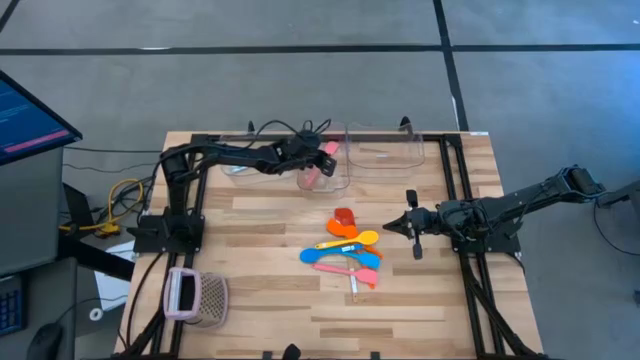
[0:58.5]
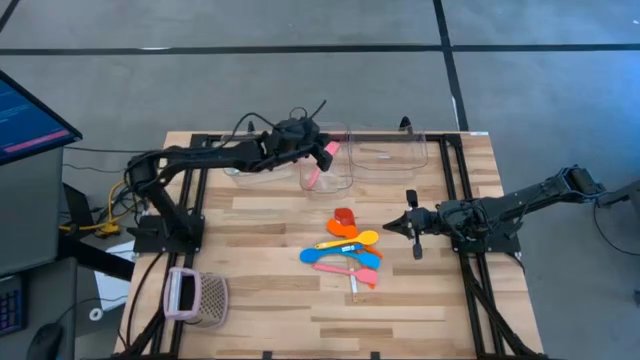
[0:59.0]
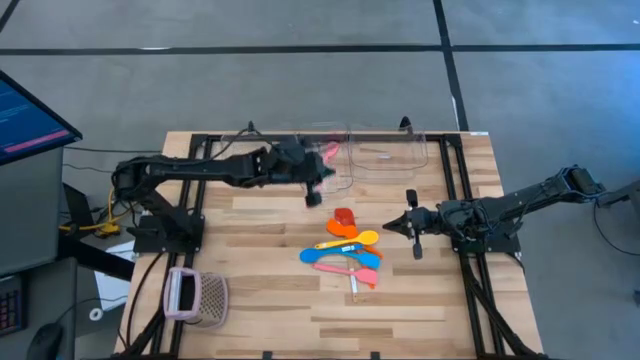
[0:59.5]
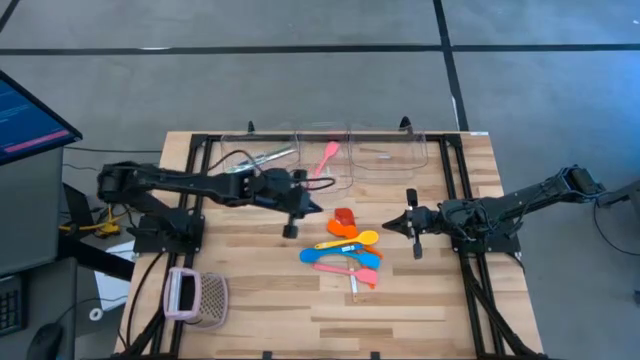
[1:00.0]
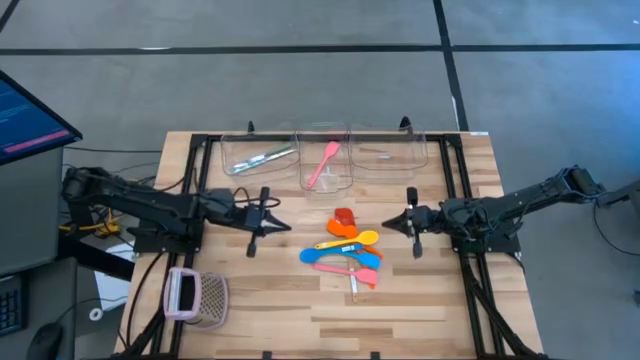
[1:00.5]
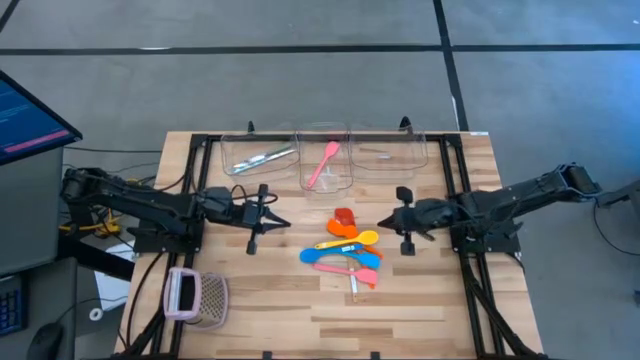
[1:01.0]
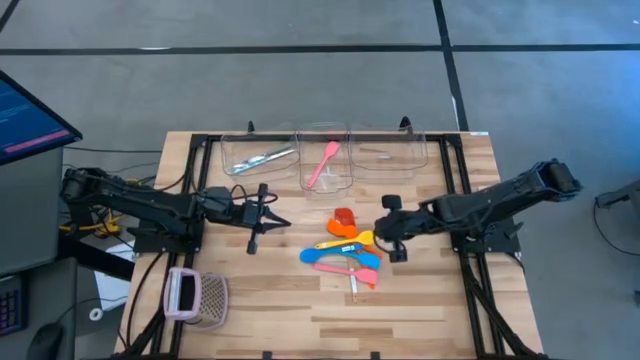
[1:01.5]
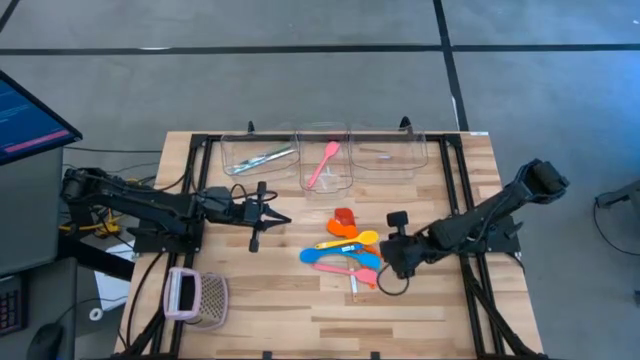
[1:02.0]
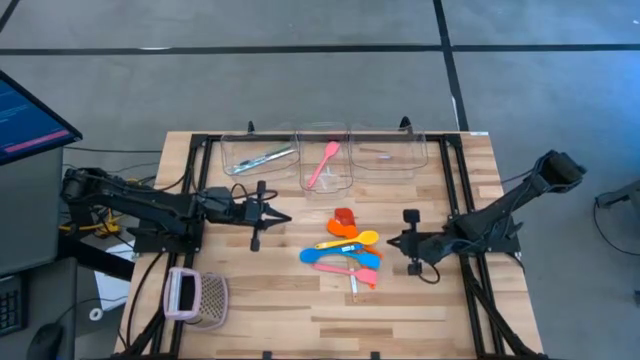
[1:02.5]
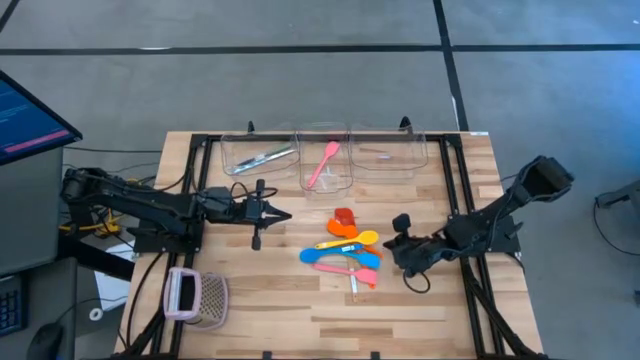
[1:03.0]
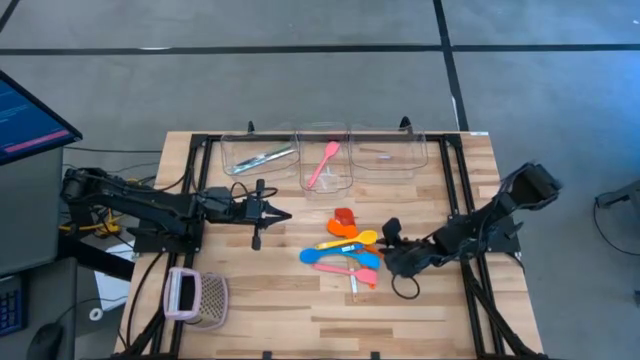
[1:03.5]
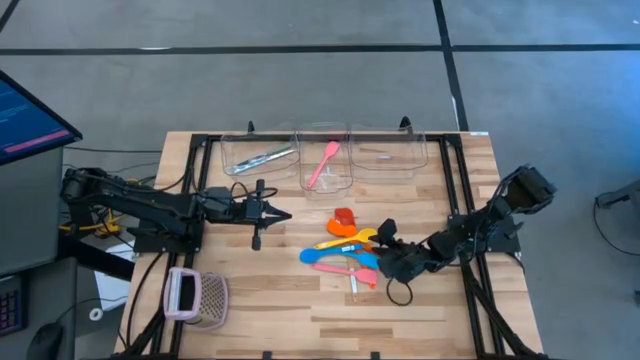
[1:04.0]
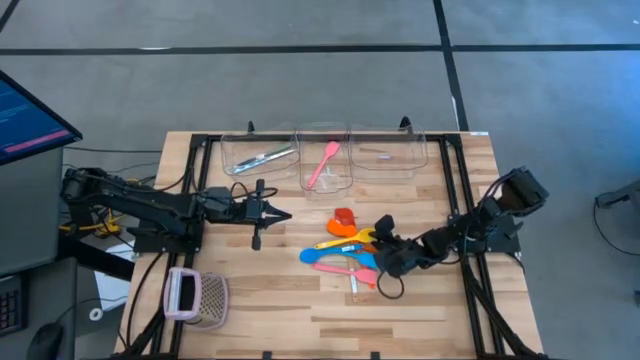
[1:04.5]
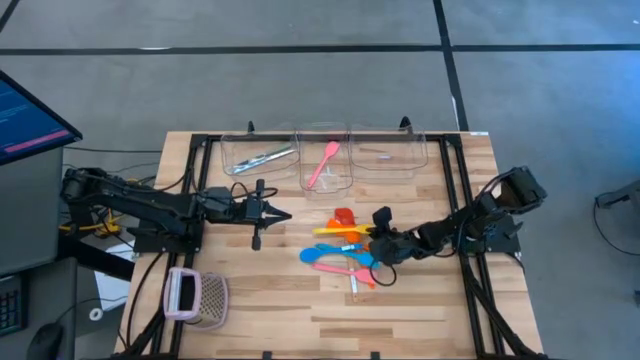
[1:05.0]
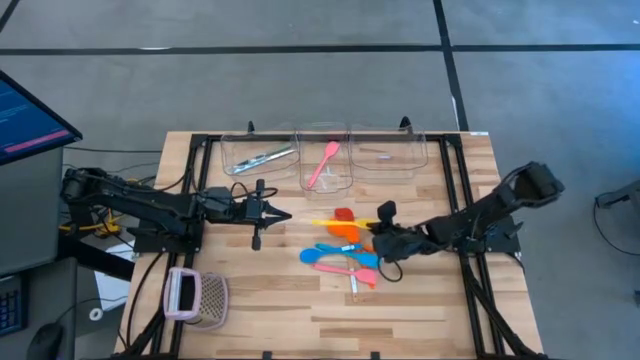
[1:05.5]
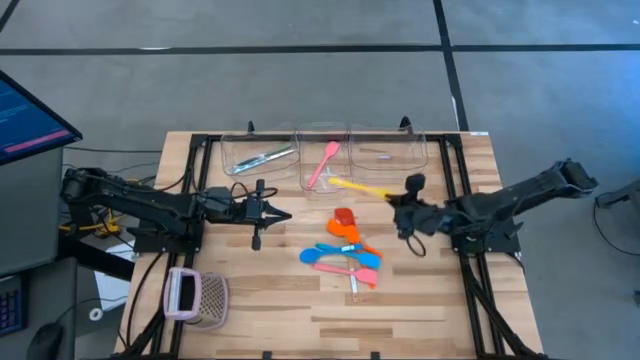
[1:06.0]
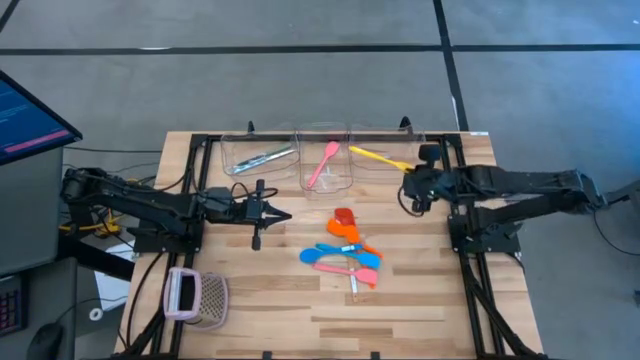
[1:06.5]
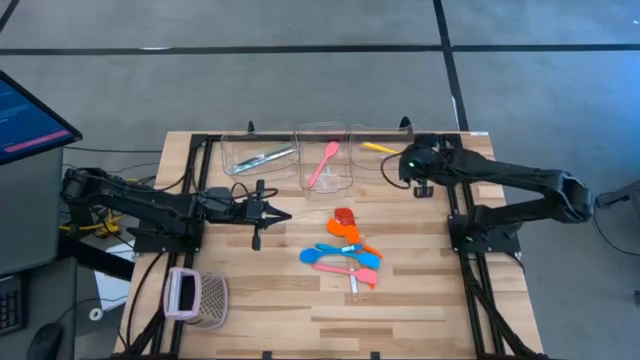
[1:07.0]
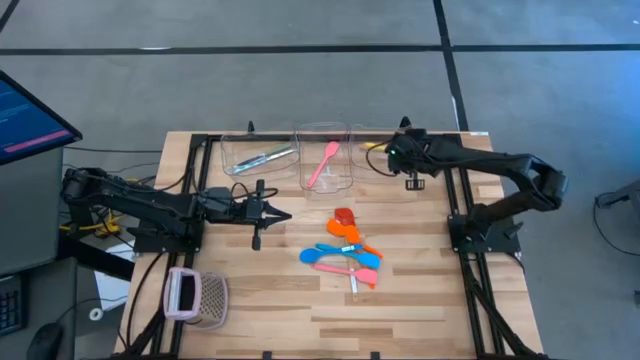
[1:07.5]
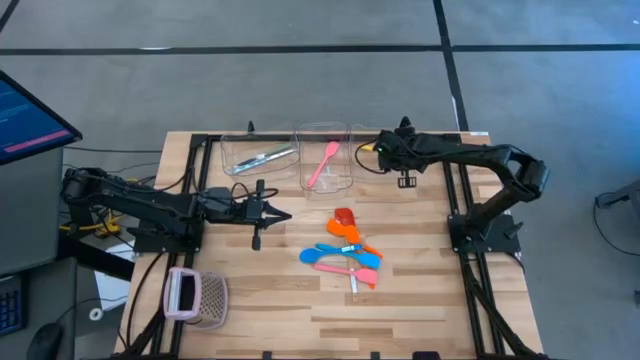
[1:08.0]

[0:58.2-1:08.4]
Task: Pick & Place Kitchen Items
Put the yellow serving spoon into the right transparent bin

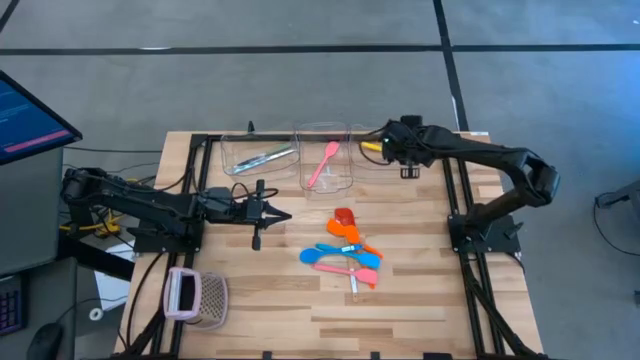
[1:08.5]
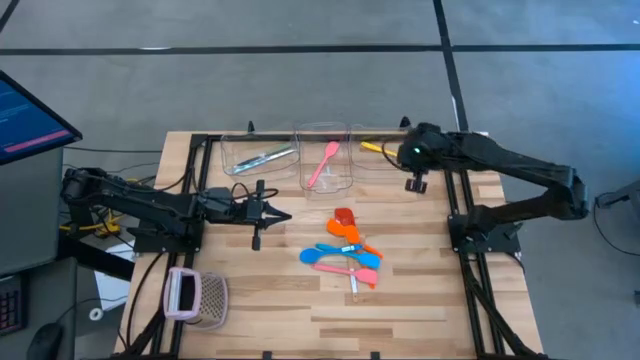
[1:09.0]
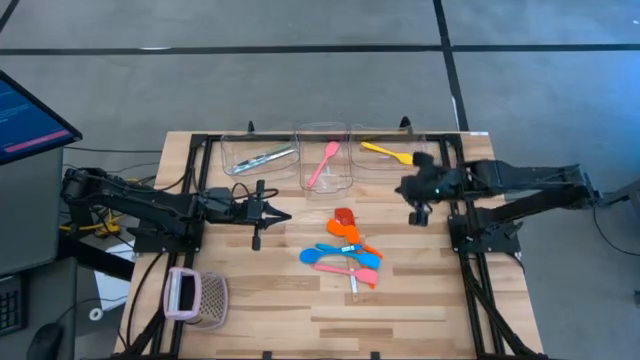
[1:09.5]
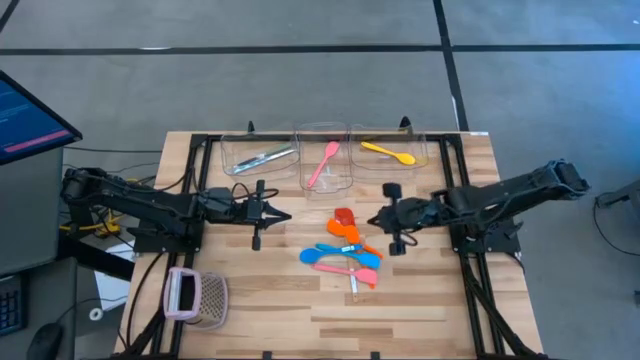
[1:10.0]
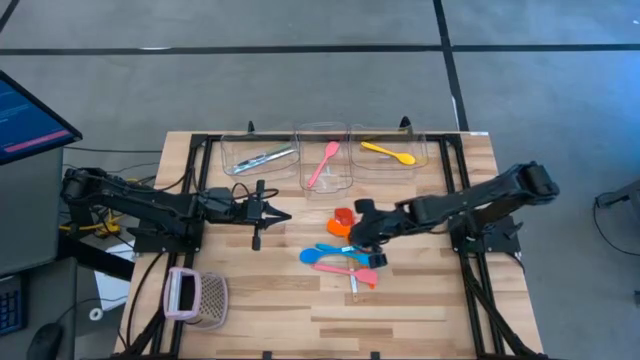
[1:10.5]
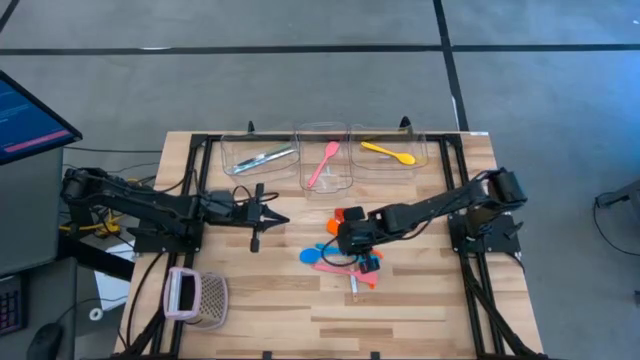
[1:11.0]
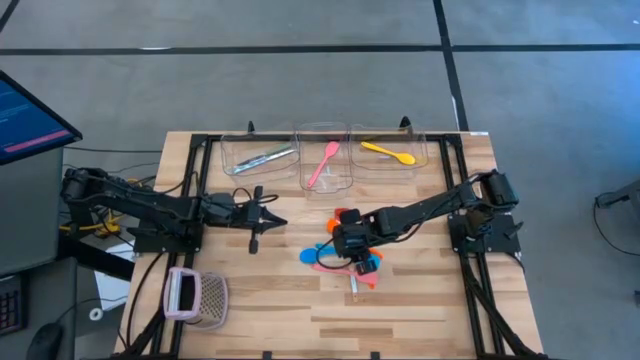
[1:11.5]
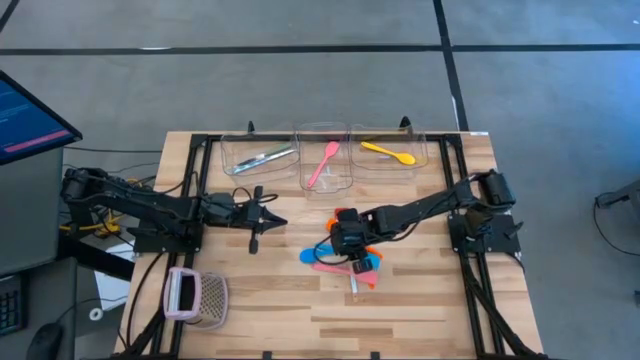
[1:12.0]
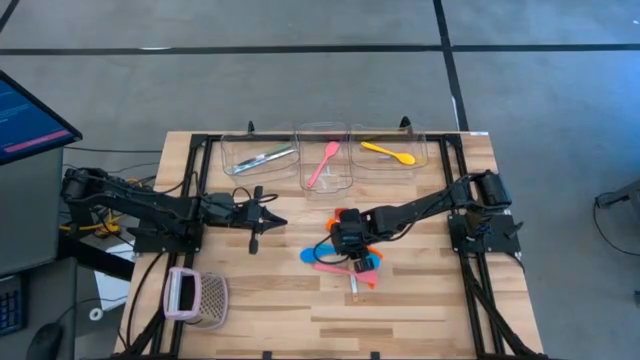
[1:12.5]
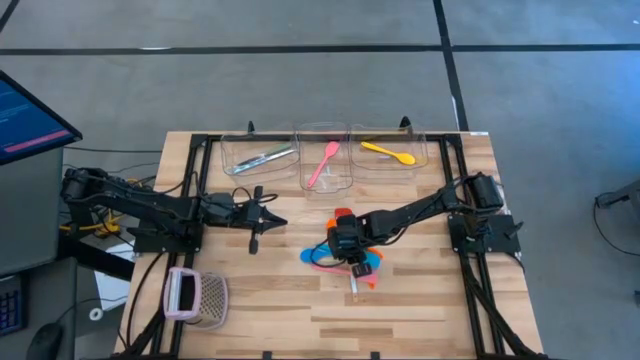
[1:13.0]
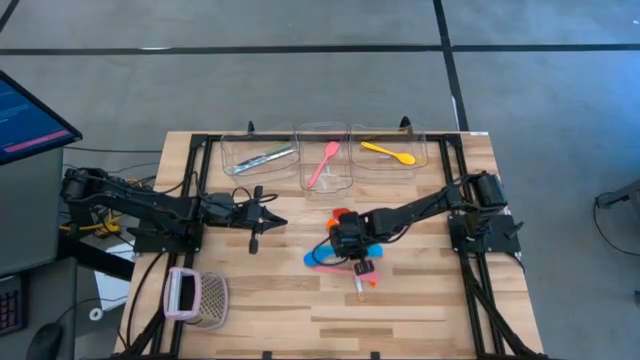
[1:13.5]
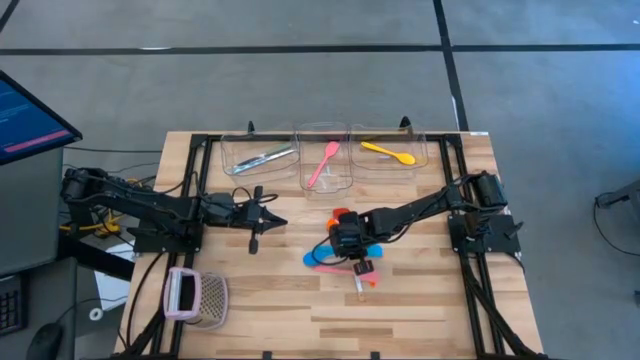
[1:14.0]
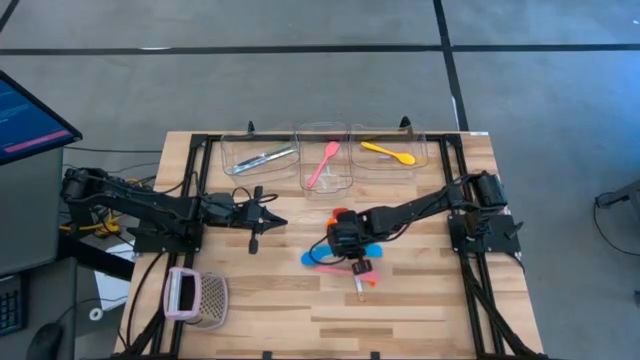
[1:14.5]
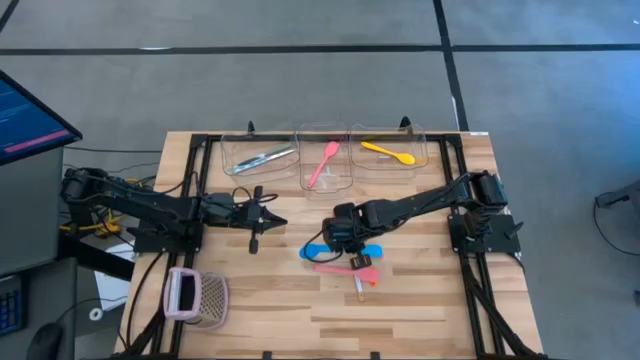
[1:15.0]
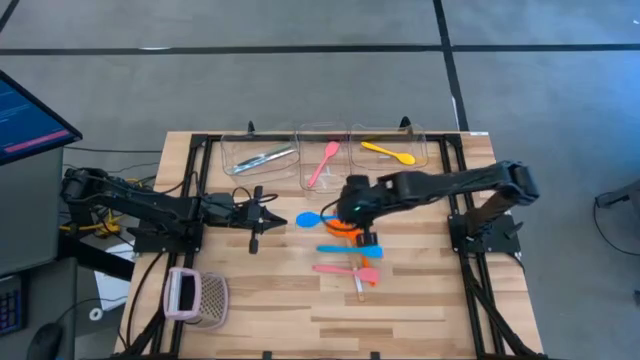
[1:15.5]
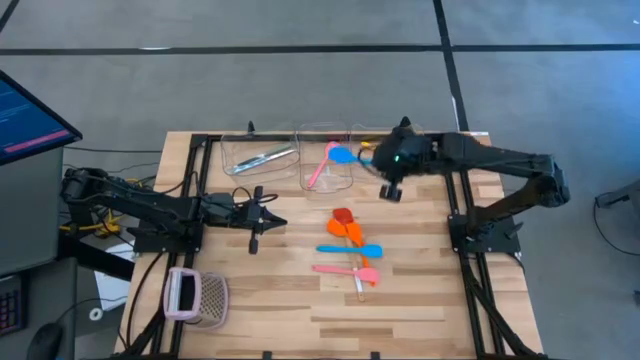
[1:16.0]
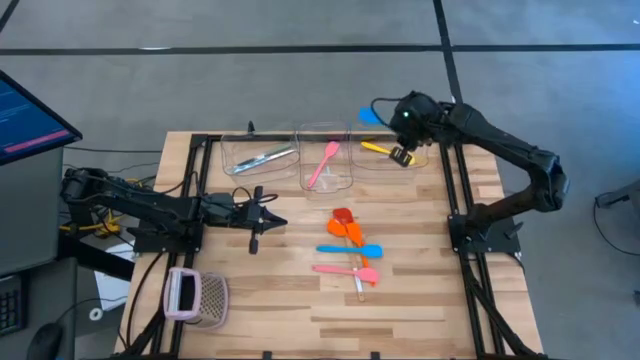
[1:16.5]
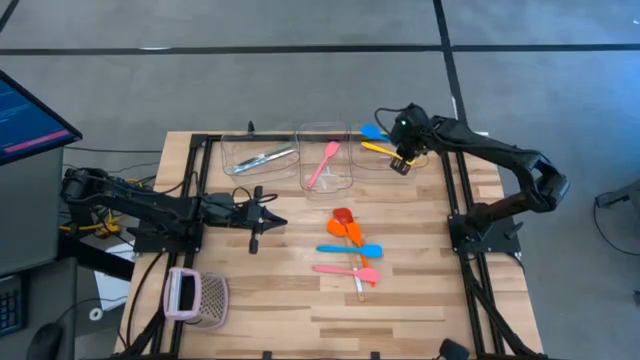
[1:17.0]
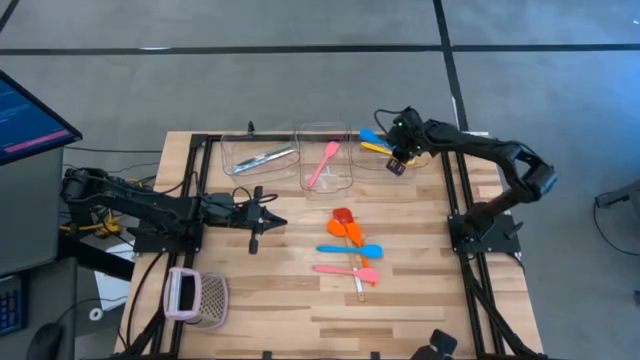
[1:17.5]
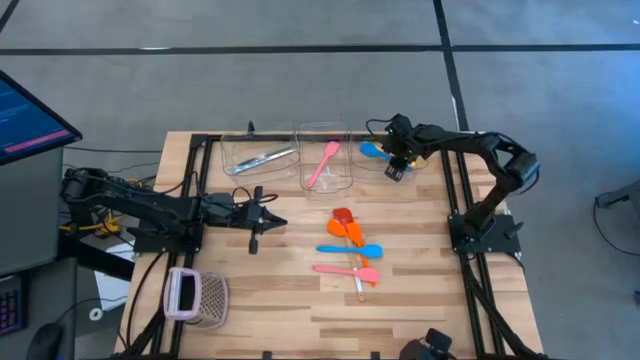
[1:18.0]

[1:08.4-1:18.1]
Put the blue serving spoon into the right transparent bin

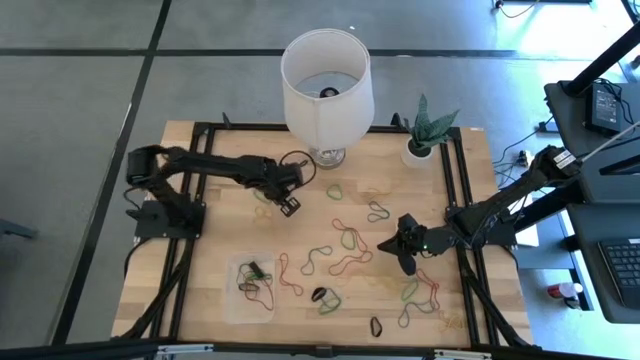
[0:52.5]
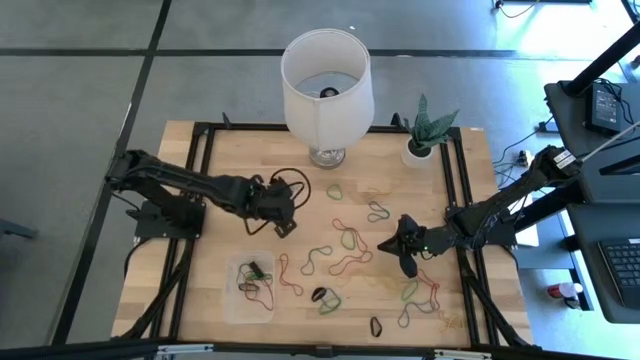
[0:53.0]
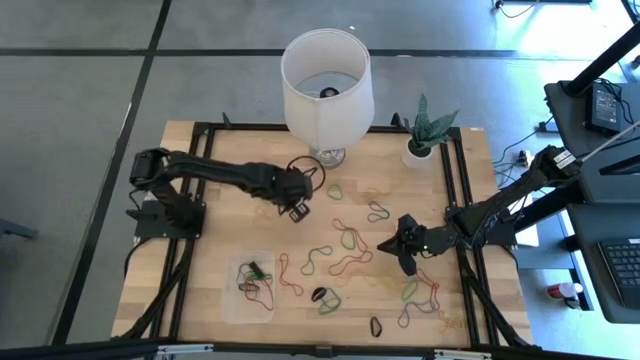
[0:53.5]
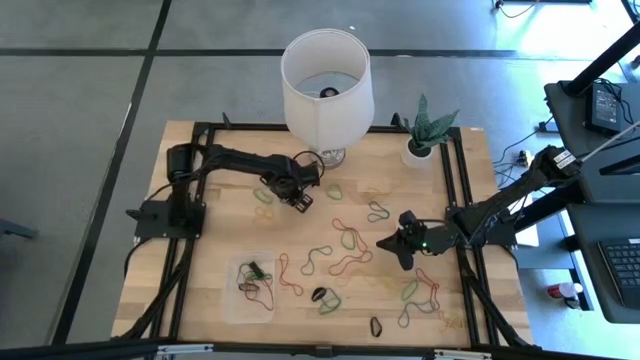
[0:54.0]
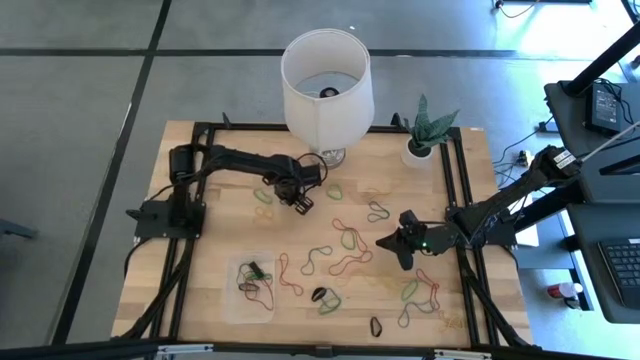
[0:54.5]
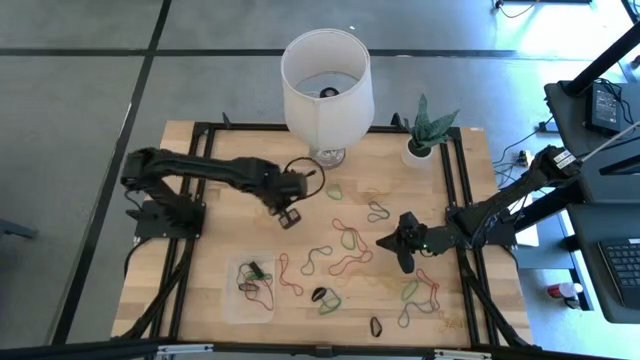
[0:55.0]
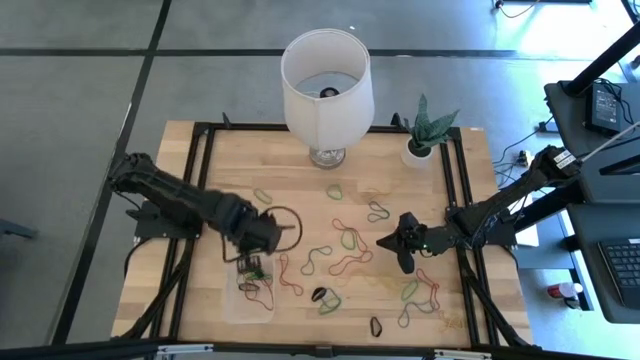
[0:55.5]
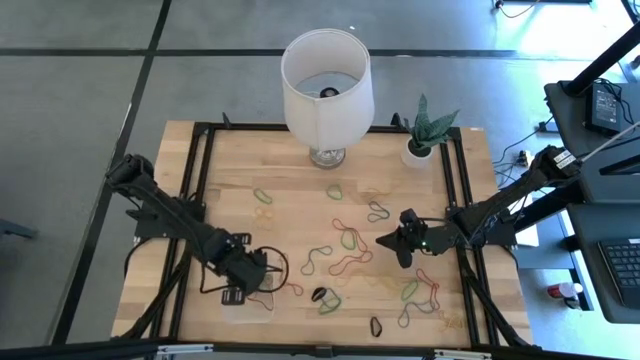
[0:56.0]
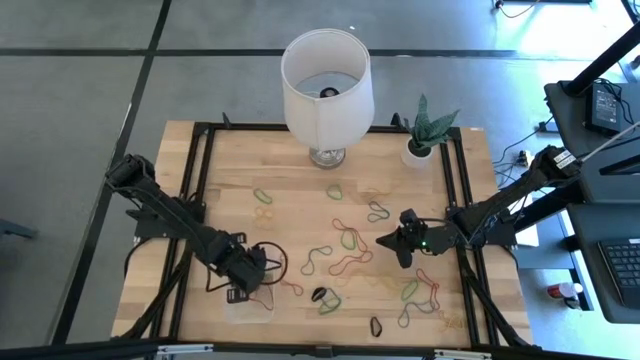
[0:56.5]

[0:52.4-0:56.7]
Task: Pick and place rubber bands into bin
Put the blue rubber band into the transparent bin
